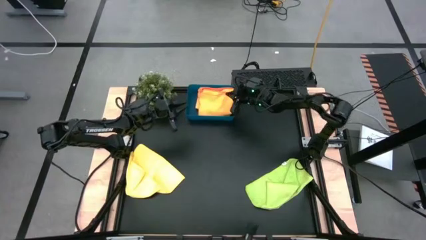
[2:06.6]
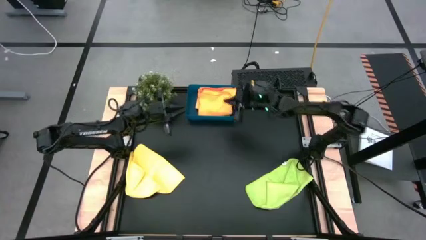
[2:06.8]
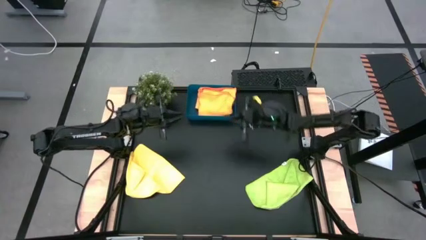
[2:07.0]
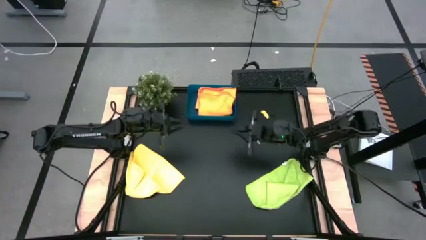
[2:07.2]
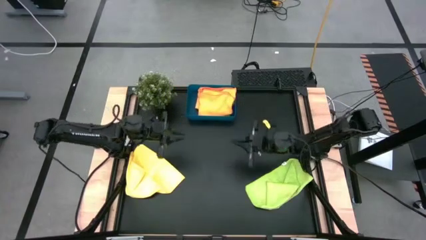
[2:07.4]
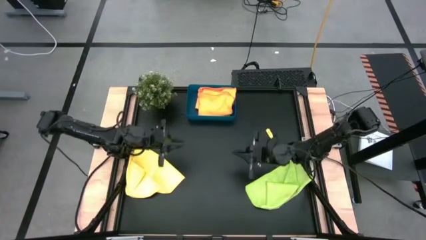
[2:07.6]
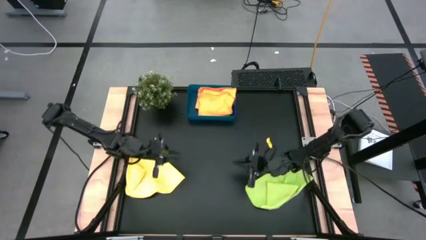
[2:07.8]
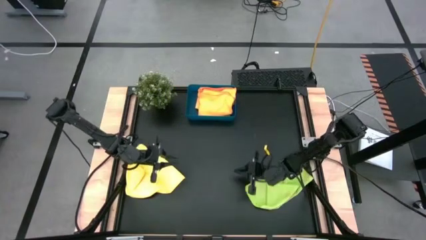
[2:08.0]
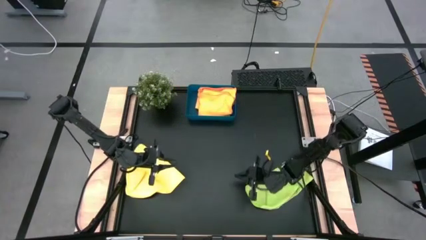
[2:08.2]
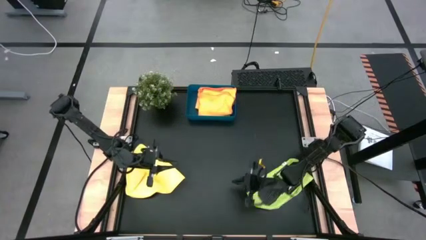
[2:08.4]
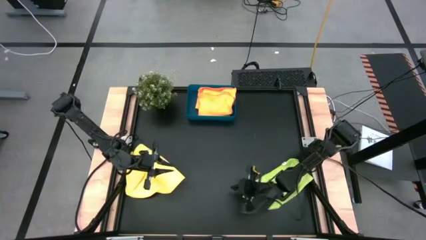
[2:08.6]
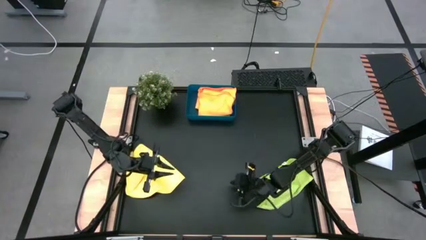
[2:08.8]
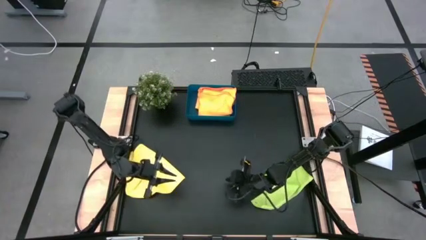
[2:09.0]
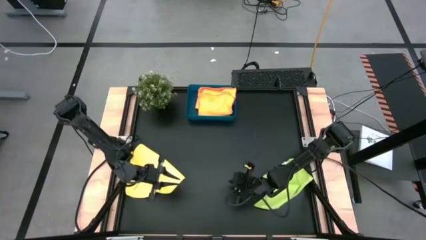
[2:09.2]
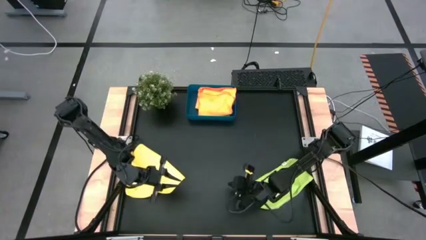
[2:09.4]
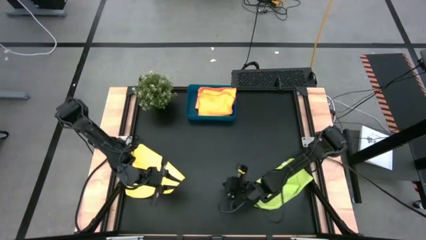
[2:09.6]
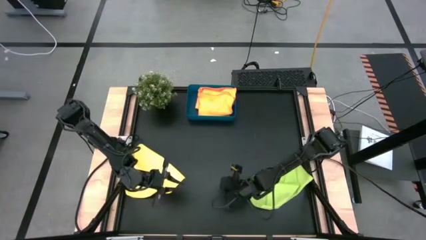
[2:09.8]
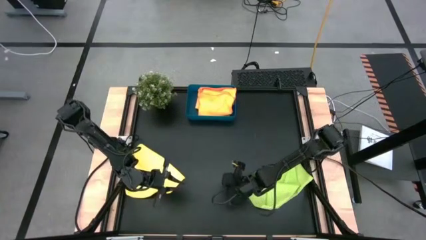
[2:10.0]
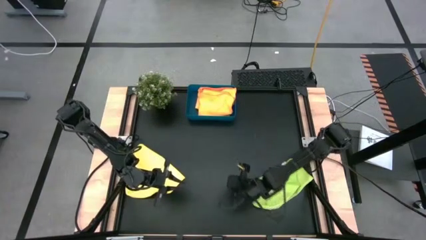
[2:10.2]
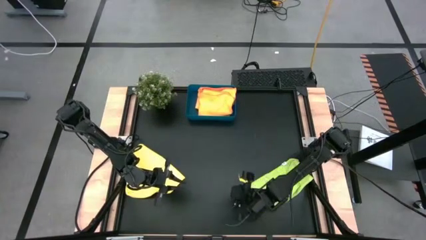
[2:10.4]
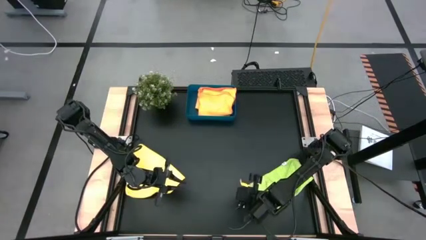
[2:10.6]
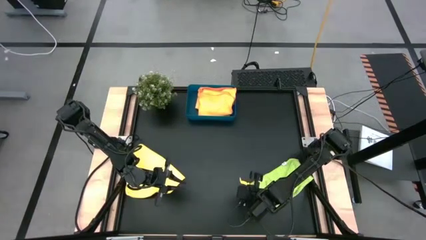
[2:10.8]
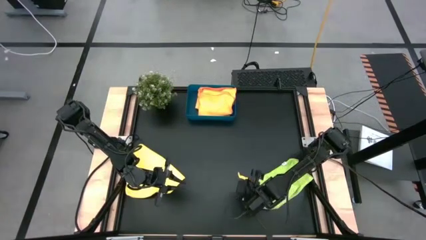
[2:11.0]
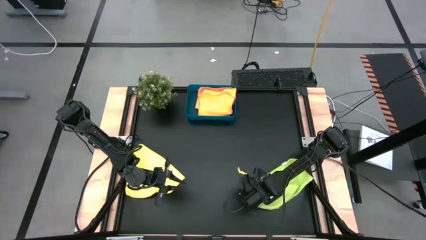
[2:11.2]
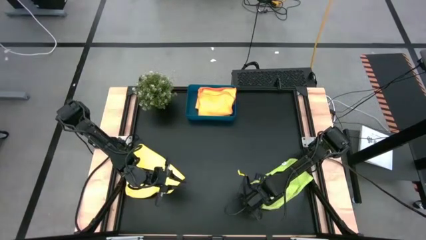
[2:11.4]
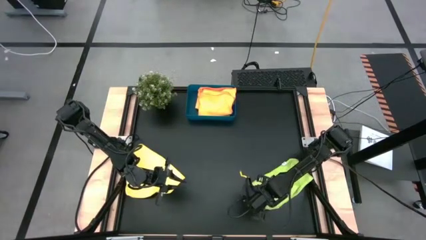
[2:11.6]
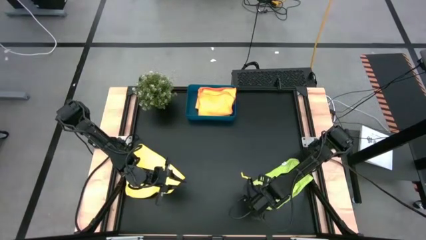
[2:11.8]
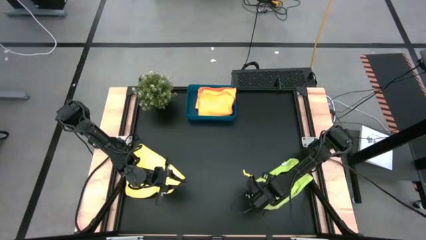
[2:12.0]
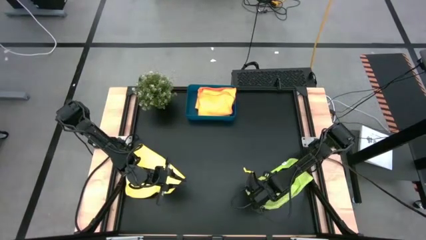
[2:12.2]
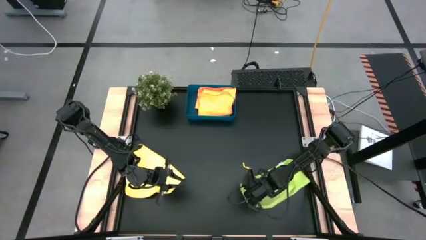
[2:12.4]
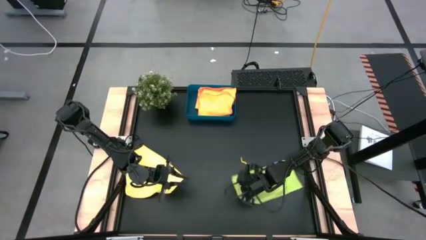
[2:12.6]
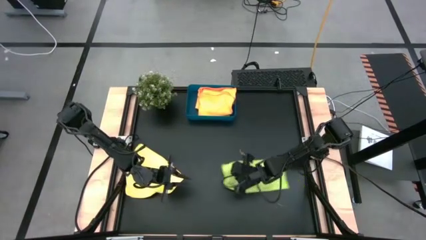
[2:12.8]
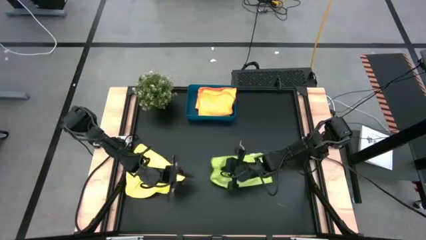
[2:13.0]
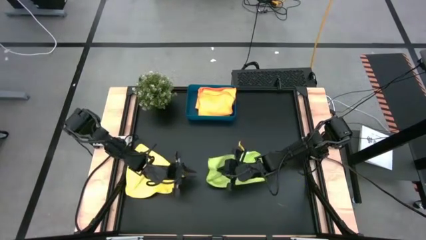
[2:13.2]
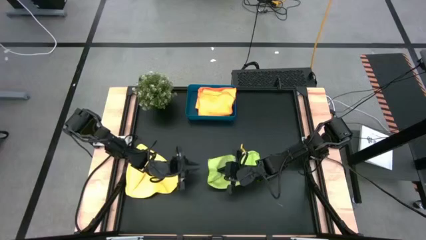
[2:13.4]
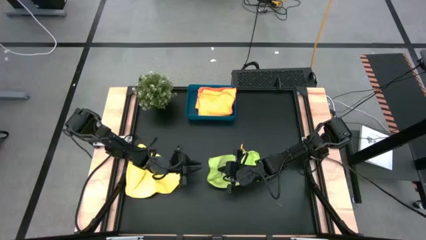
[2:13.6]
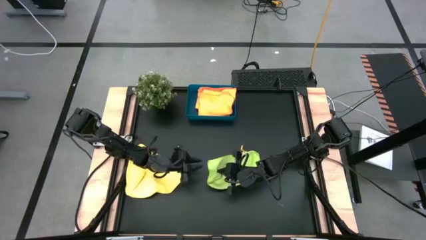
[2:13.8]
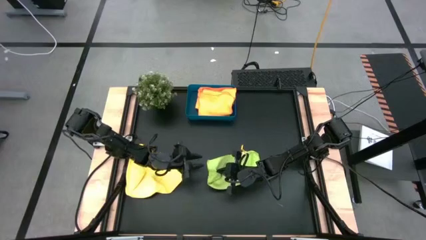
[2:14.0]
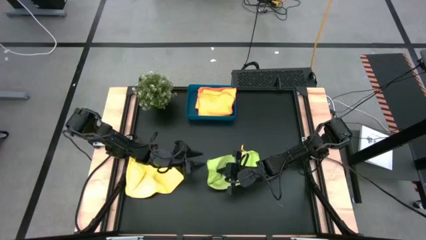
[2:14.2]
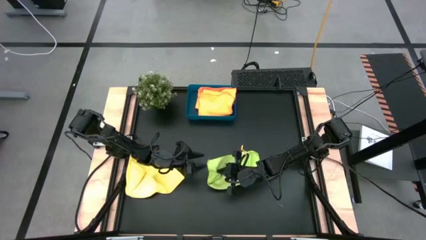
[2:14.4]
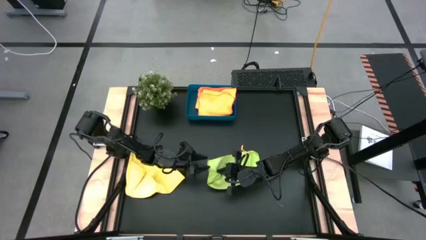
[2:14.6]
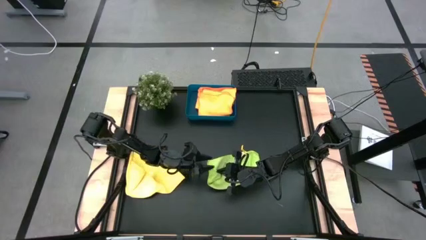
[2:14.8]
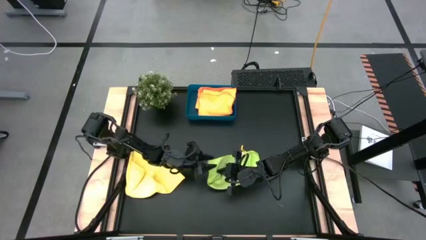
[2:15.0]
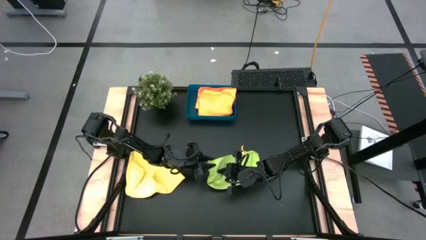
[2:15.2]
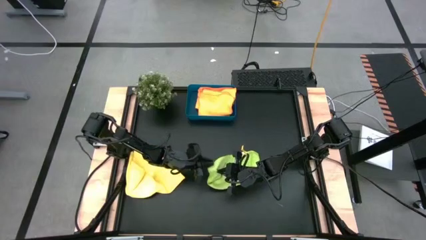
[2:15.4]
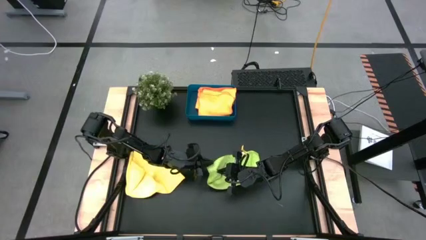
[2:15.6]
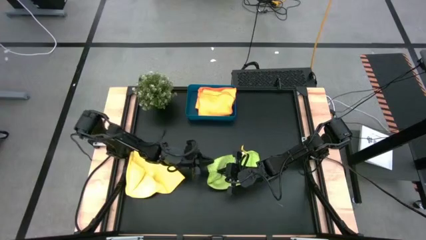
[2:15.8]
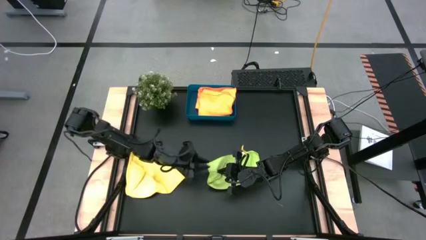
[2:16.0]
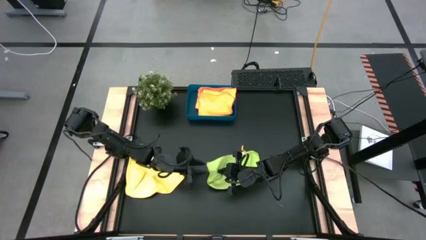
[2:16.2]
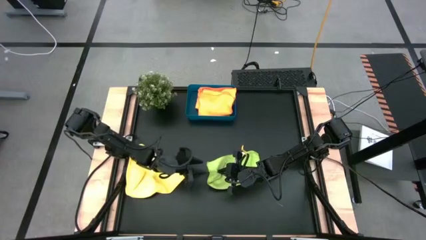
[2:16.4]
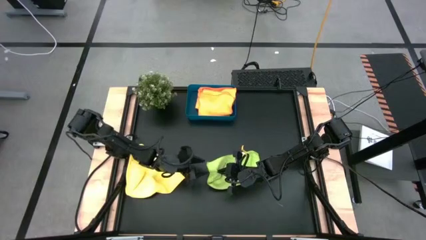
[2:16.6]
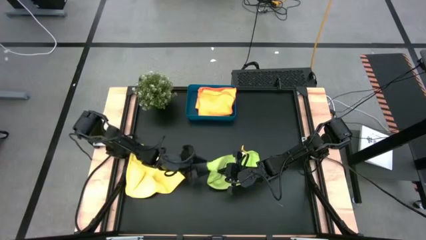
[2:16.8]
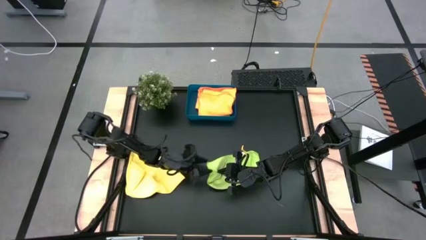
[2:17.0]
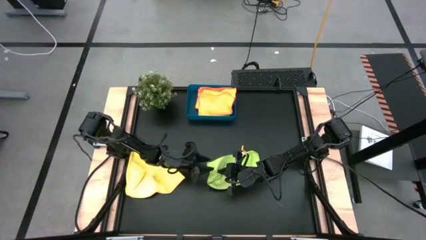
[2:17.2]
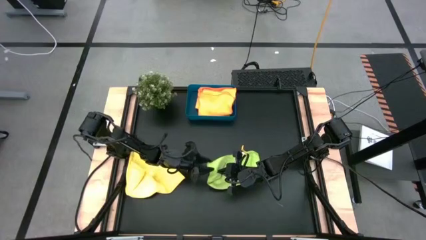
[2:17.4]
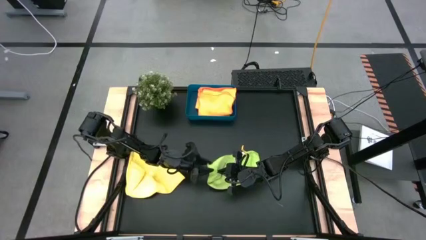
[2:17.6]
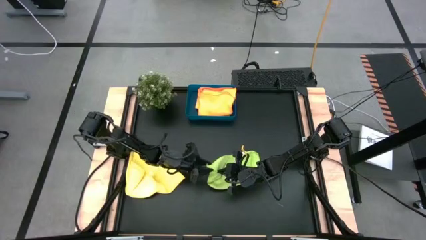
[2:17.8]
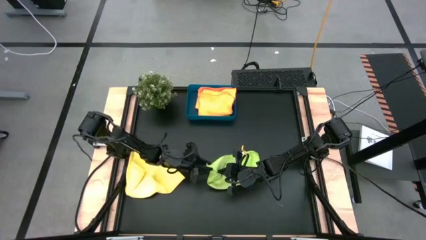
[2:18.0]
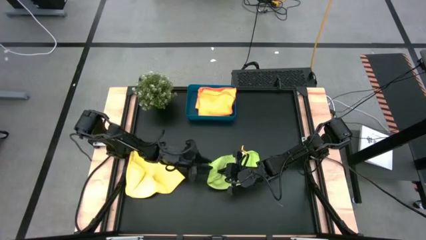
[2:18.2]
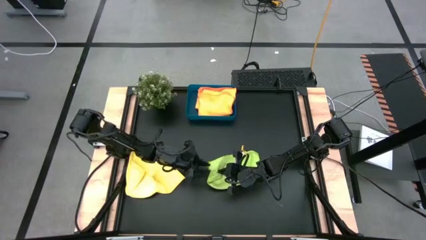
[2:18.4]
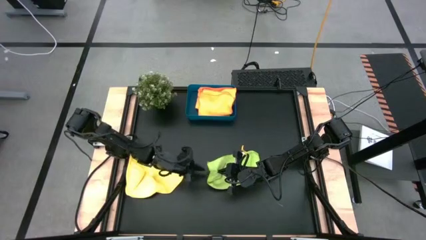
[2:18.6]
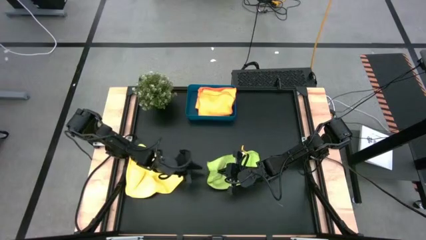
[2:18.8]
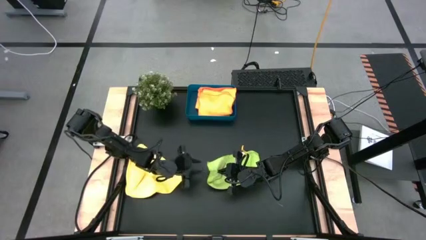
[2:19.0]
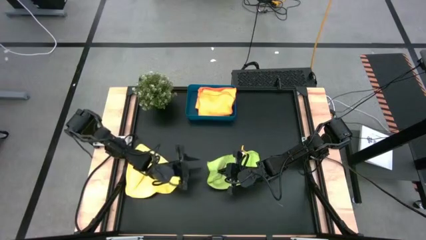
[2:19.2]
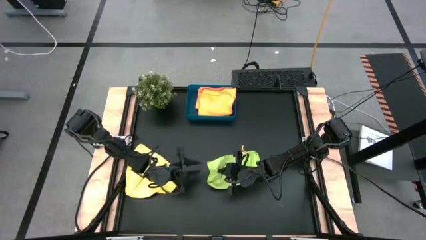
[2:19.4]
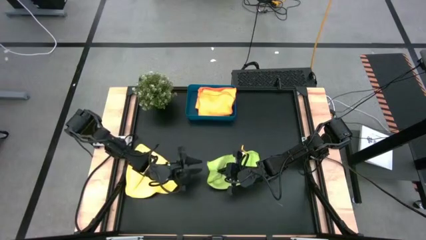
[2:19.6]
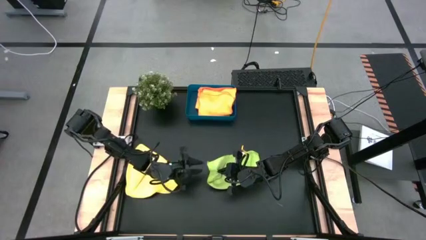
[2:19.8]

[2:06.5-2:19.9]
Task: Fold microfiber towels
Fold the green microfiber towel

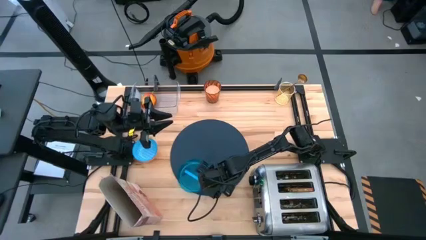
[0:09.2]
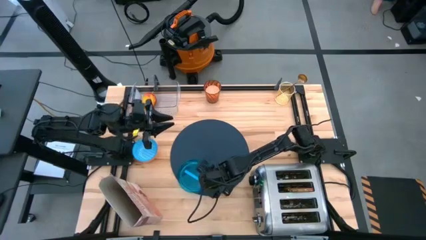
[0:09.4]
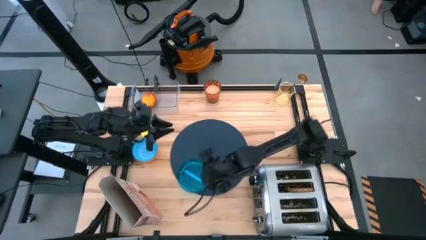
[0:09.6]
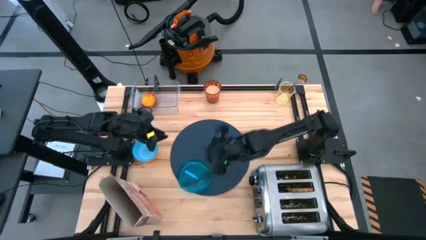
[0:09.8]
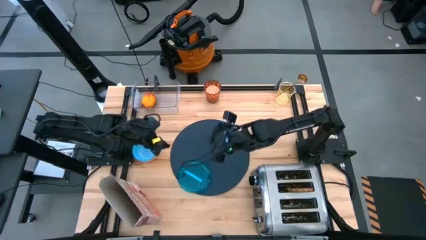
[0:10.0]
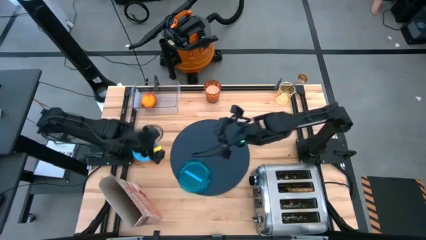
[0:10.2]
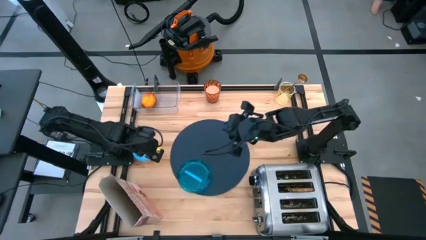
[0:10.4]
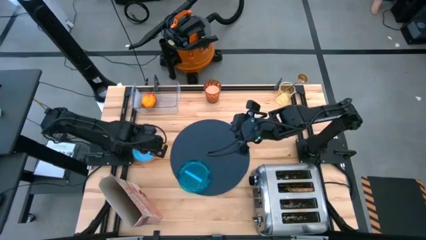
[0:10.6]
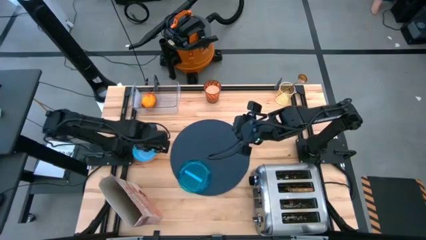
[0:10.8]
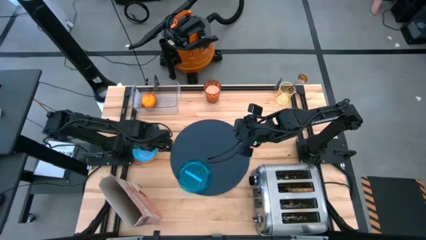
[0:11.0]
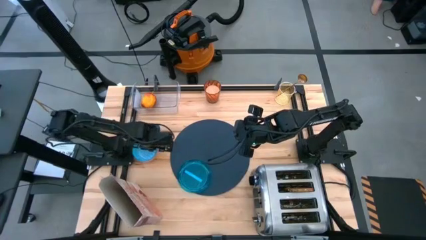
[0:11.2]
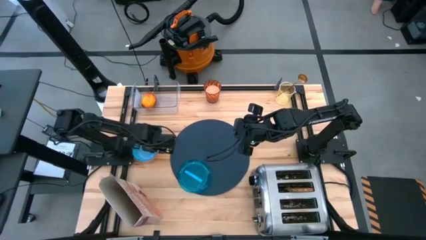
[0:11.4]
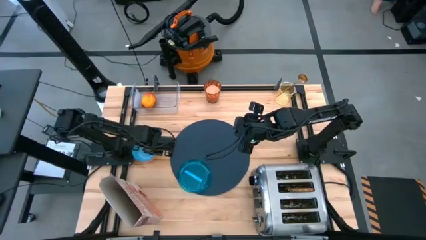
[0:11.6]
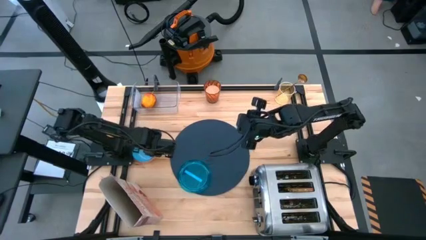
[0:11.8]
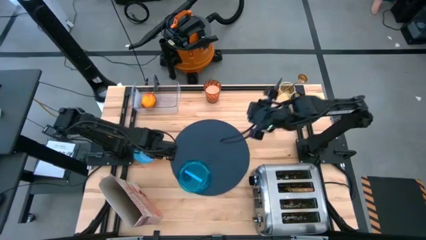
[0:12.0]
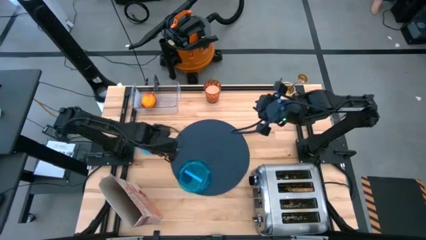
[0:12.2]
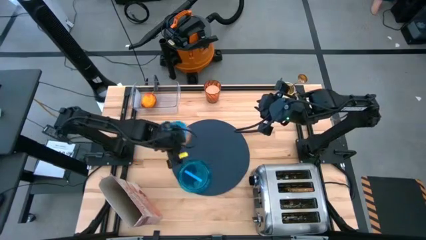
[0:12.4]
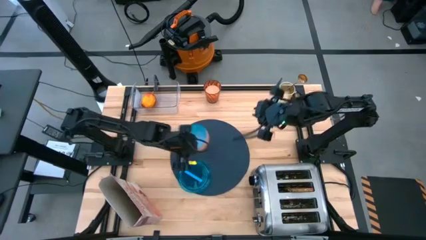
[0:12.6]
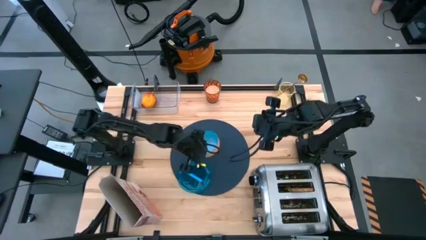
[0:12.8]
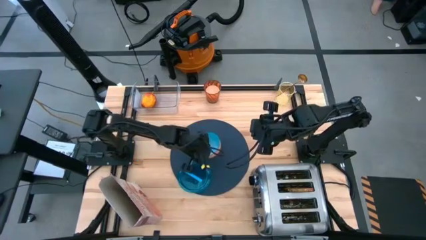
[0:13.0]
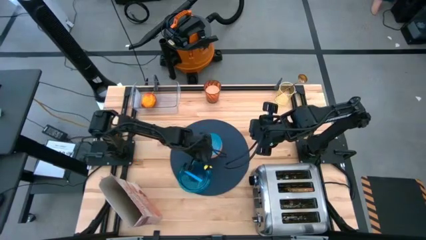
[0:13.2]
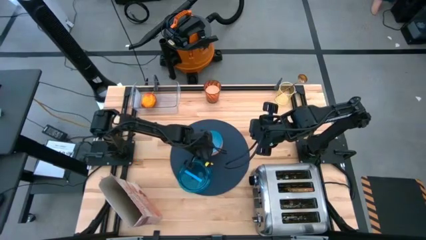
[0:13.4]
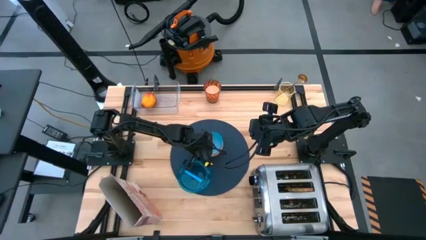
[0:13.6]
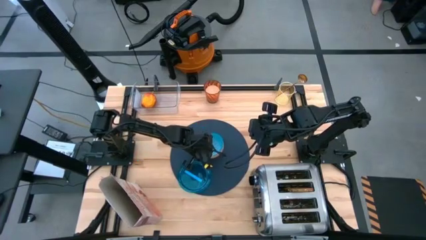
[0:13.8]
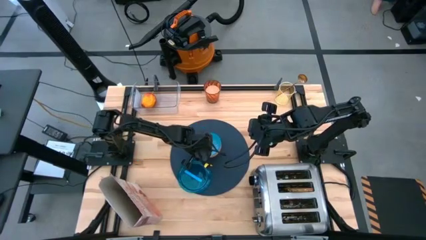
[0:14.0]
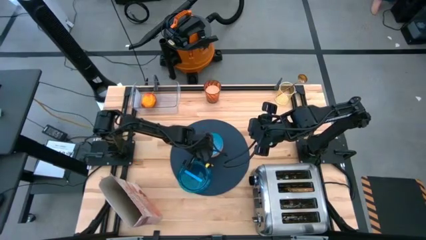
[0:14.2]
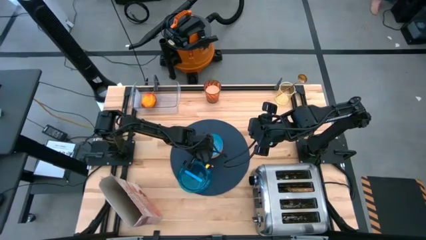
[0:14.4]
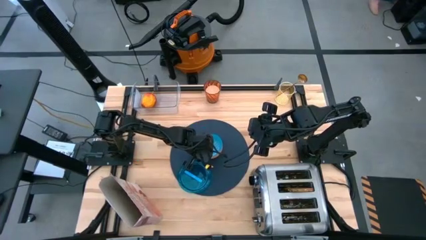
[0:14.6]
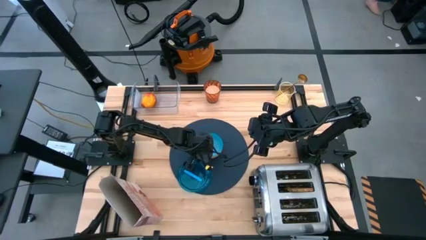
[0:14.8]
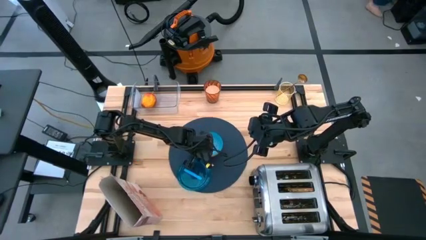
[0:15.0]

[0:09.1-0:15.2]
Task: Arrange a breakfast setting
Put the bowl into the center of the placemat
